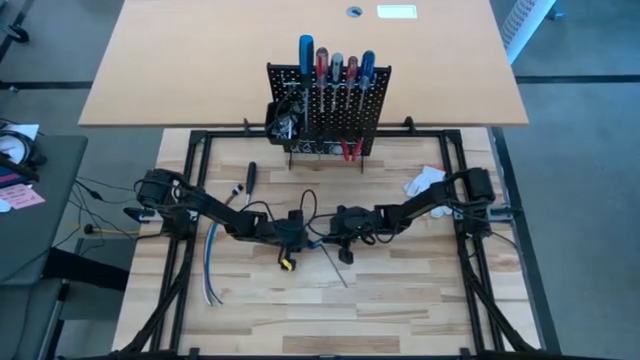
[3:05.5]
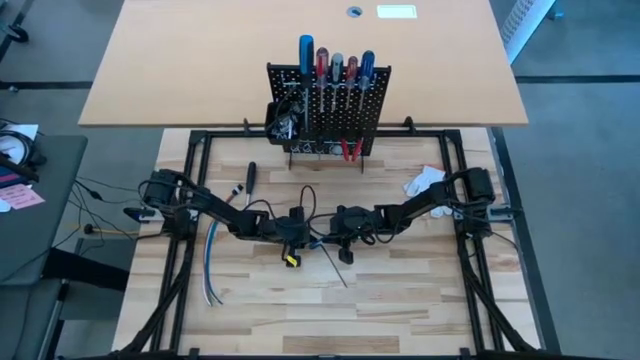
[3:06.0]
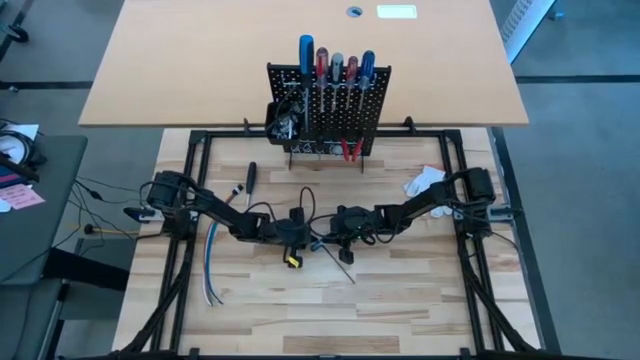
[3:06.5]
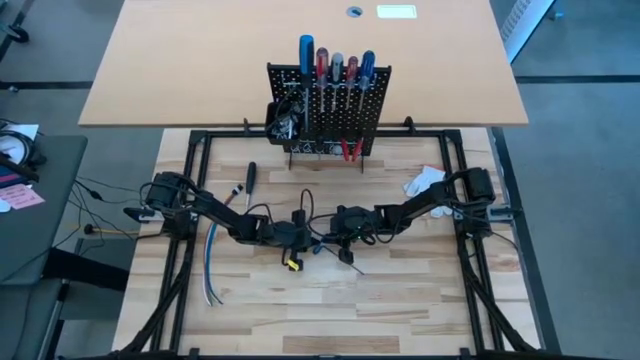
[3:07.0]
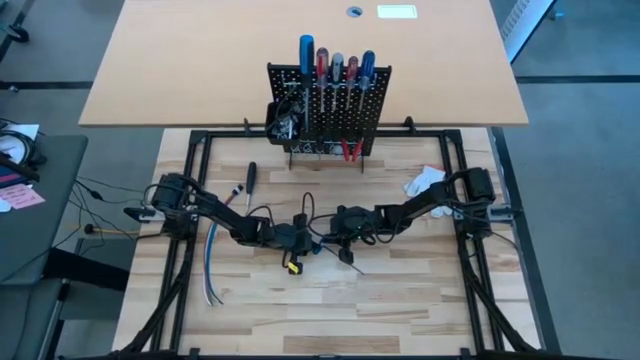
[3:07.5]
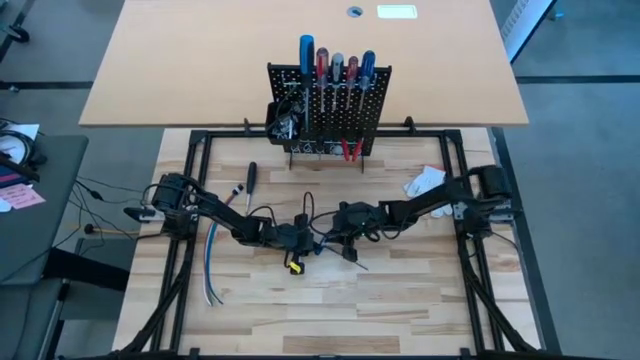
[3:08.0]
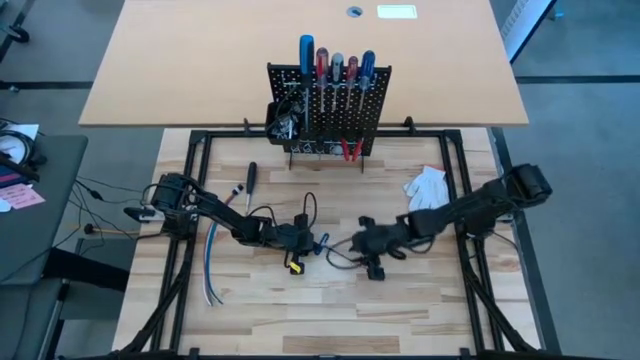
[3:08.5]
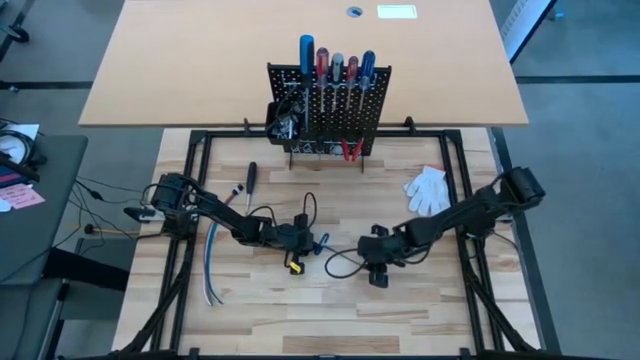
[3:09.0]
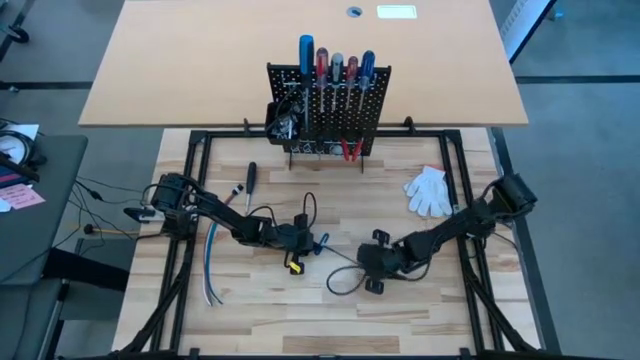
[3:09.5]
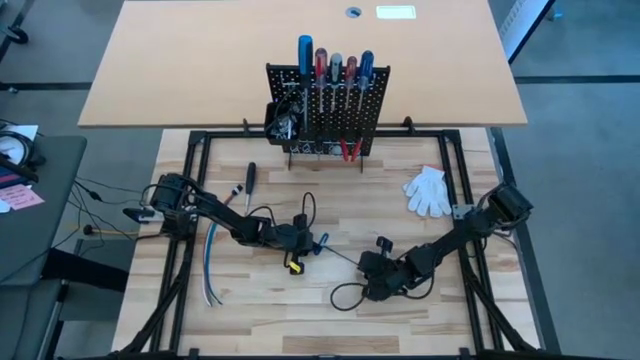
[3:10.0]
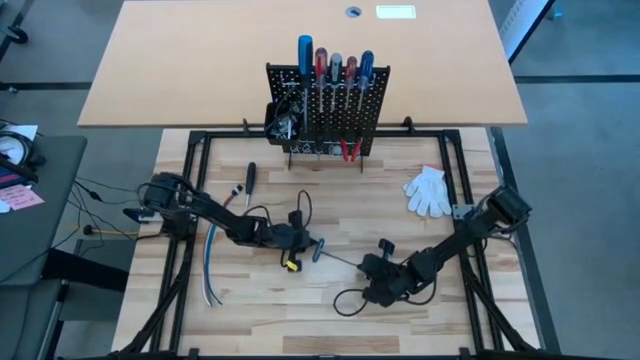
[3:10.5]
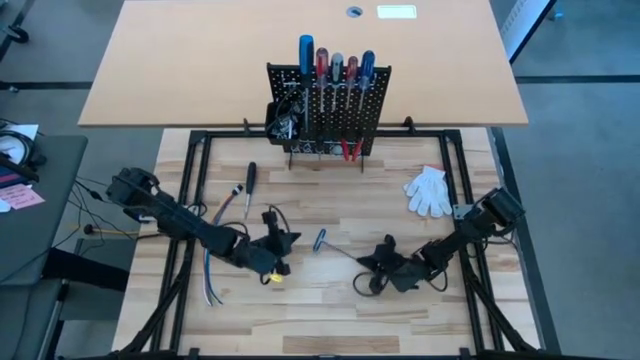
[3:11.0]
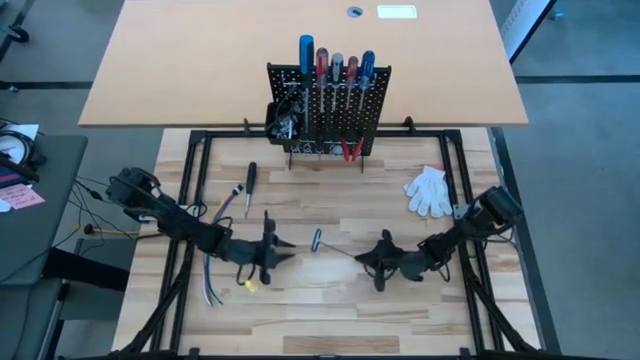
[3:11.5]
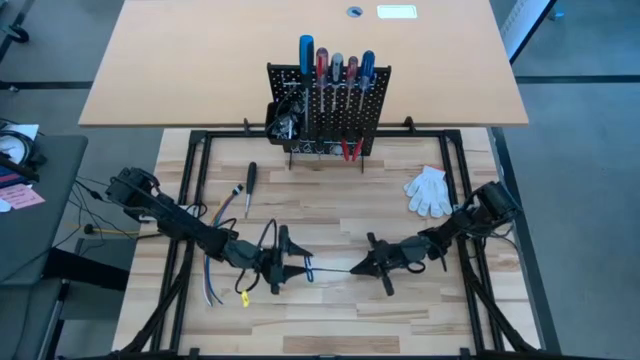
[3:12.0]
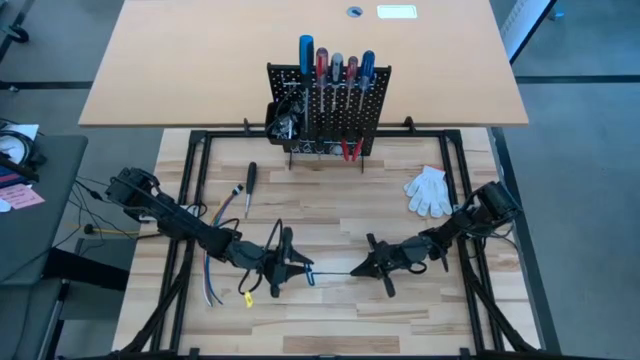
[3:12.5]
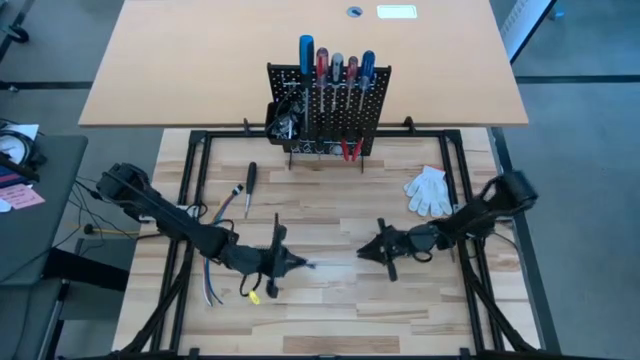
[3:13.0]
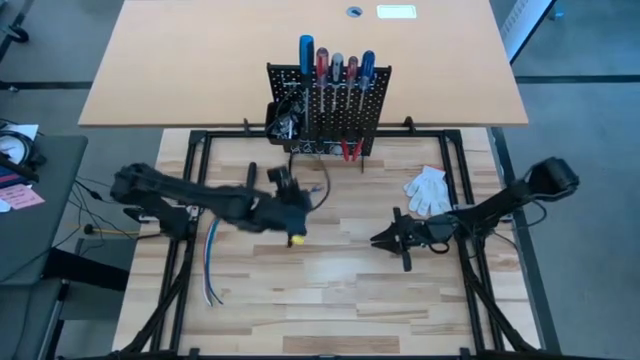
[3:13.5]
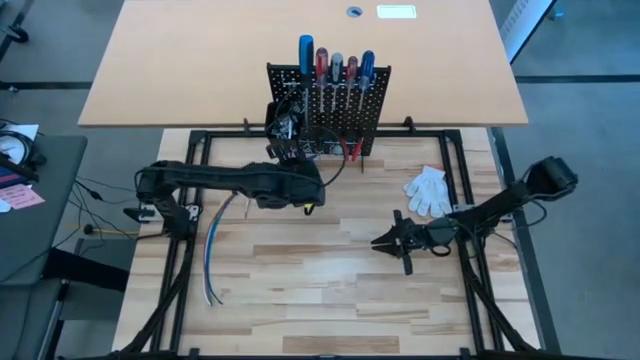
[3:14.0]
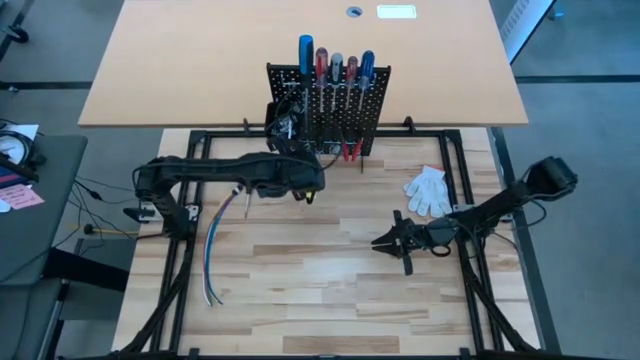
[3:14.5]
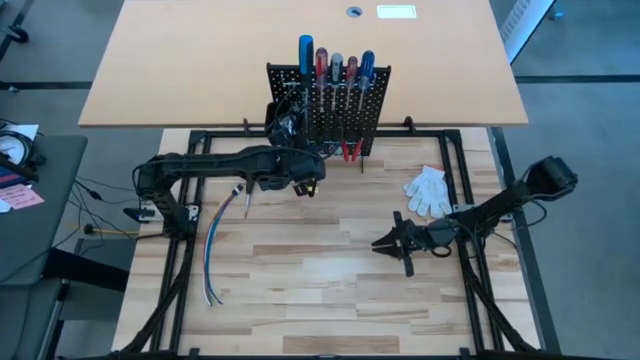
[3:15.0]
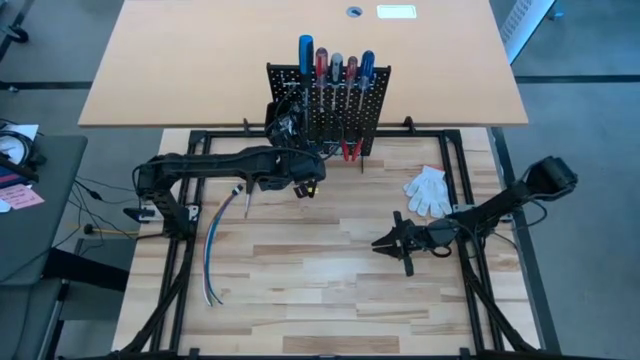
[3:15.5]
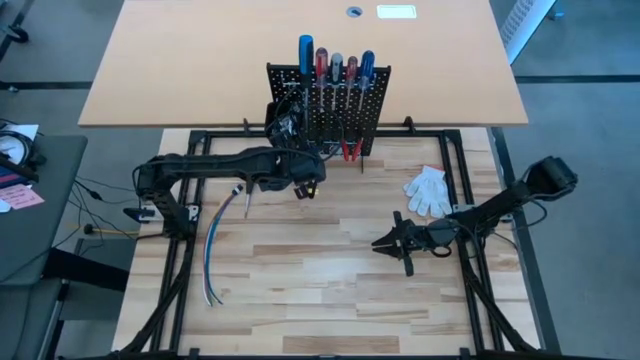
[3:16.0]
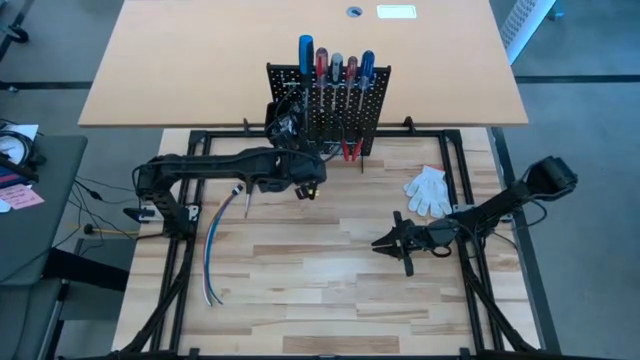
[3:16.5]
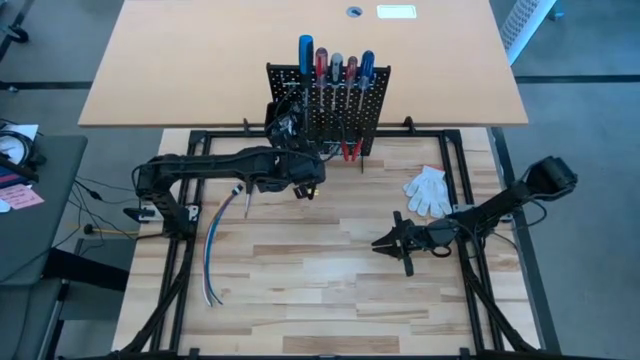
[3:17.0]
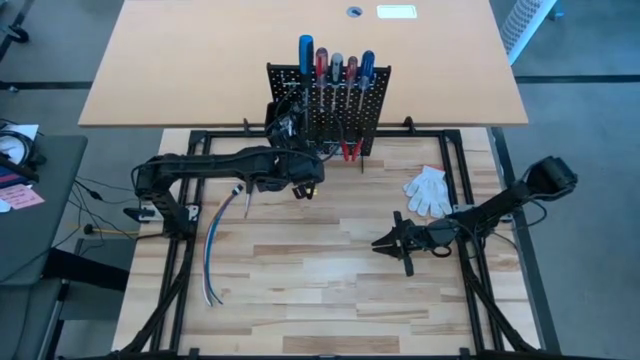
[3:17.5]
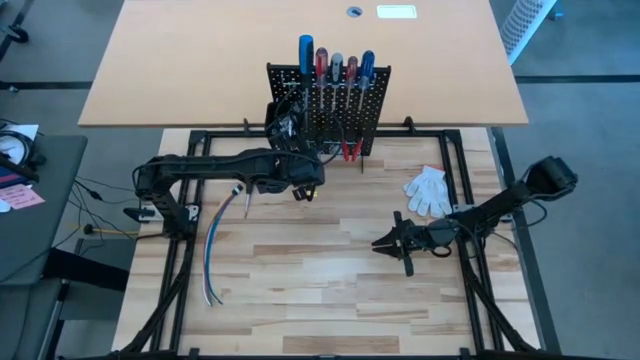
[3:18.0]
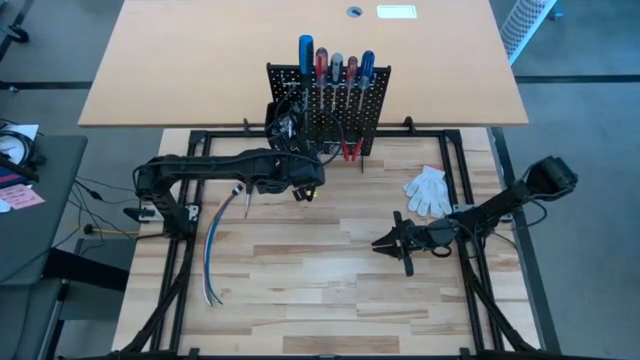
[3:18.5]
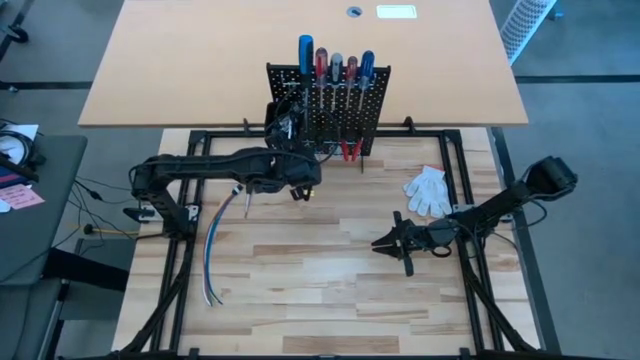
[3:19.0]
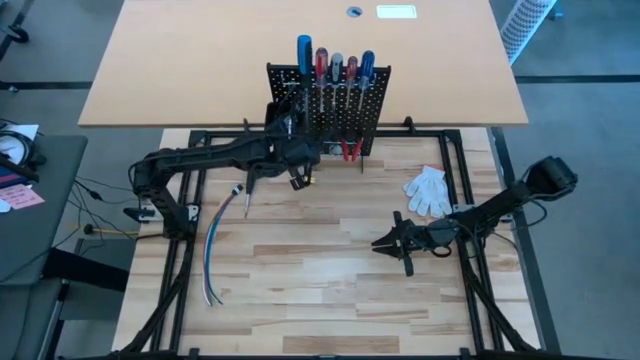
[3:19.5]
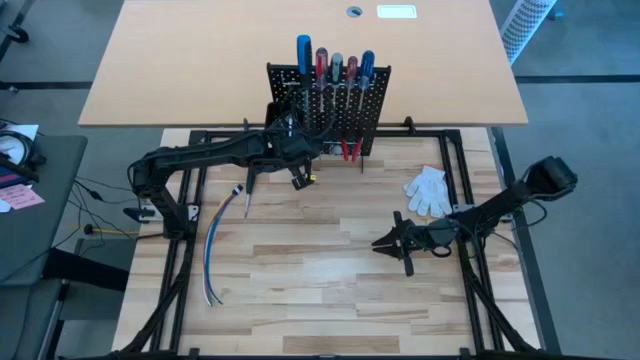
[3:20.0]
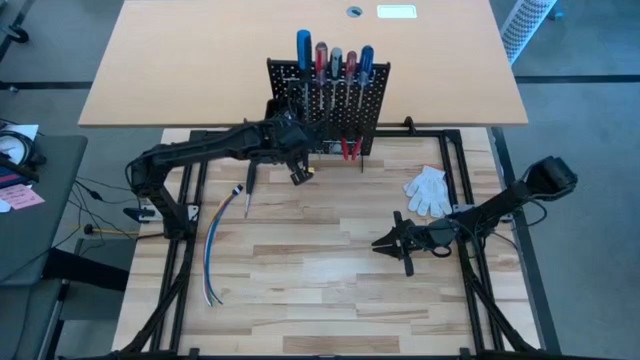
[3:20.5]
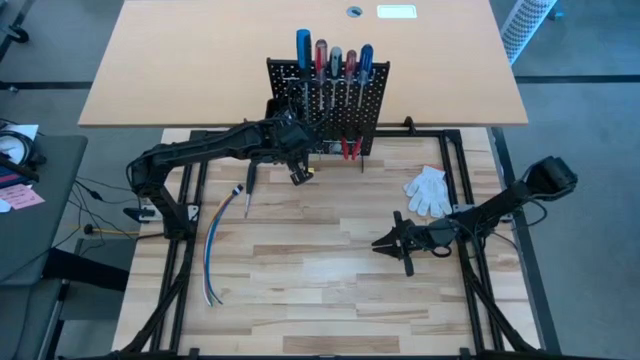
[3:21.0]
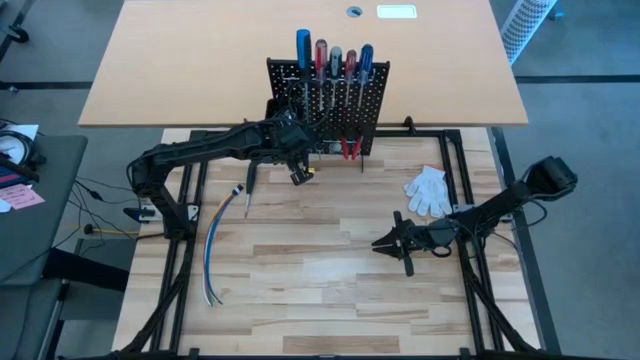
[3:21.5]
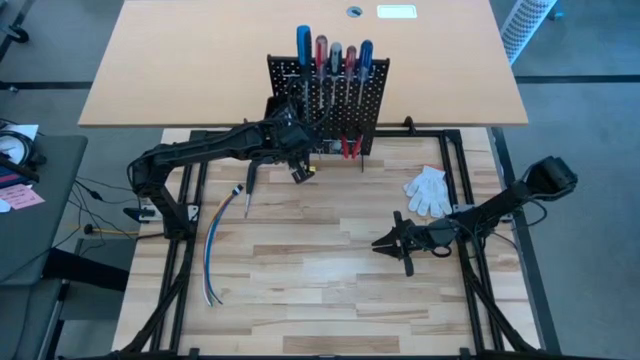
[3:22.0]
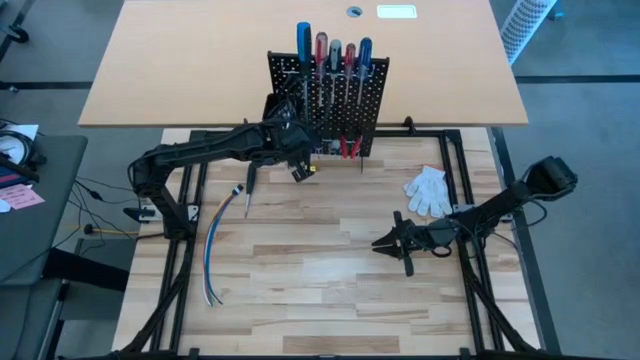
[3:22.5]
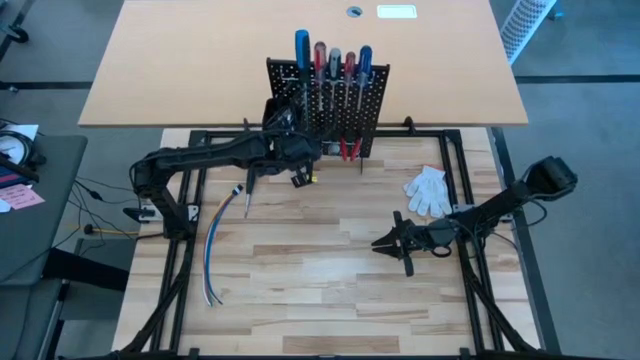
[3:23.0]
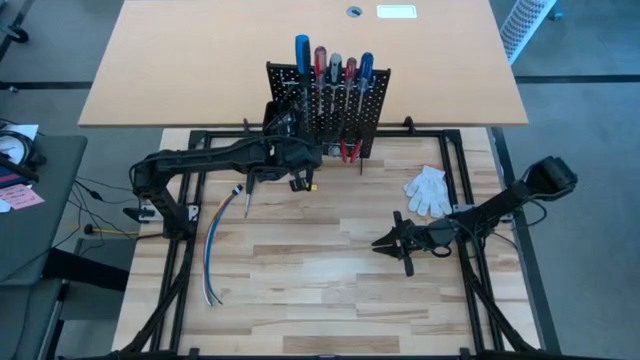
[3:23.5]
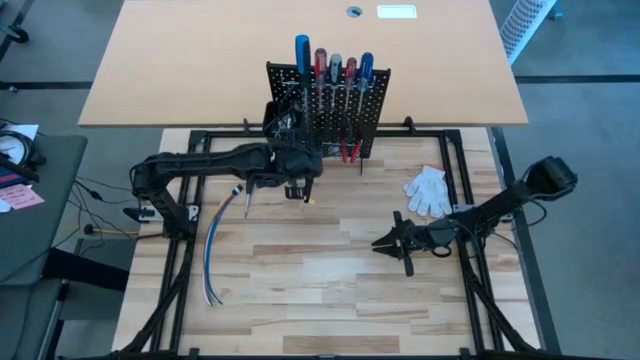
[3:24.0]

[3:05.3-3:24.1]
Task: Hang tools onto peg board
Hang the blue pick tool on the black pegboard

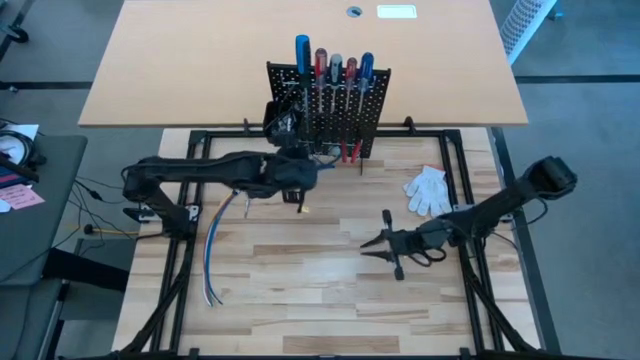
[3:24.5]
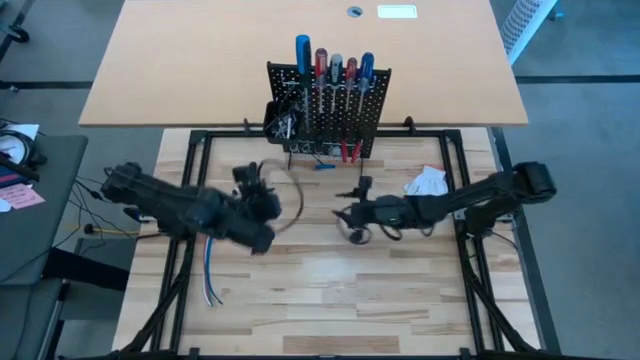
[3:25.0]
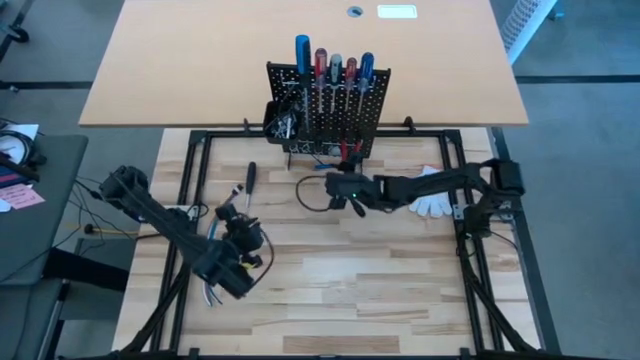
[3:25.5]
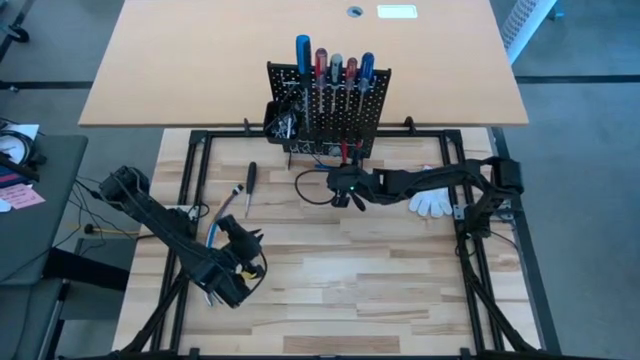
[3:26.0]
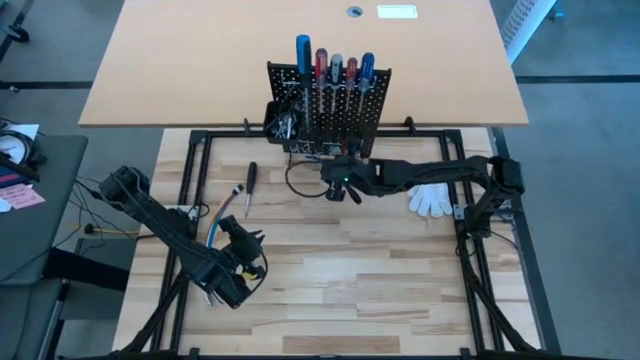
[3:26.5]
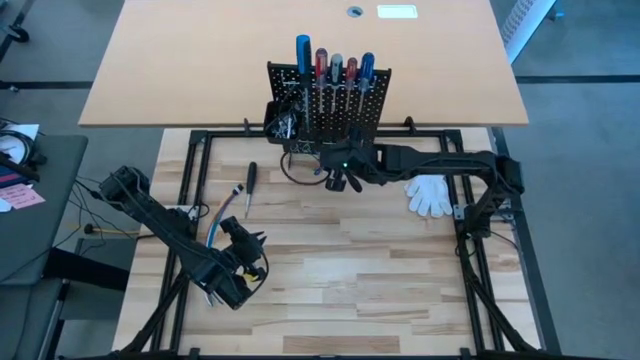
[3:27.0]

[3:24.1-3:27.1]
Hang the blue pick tool on the black pegboard
